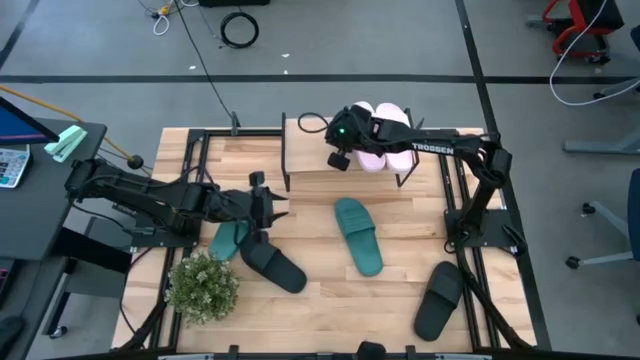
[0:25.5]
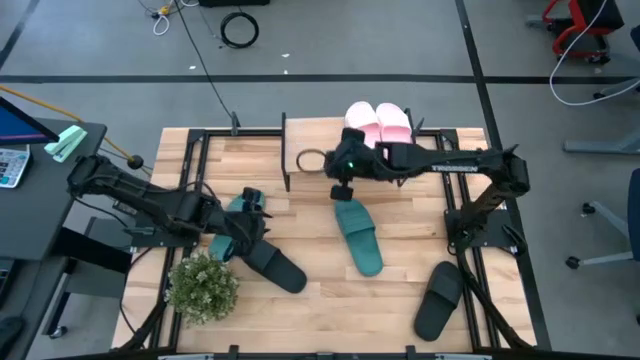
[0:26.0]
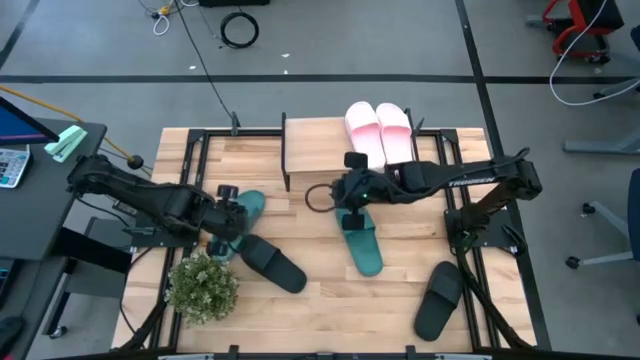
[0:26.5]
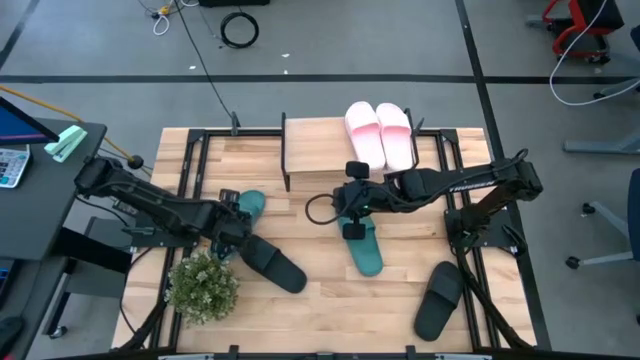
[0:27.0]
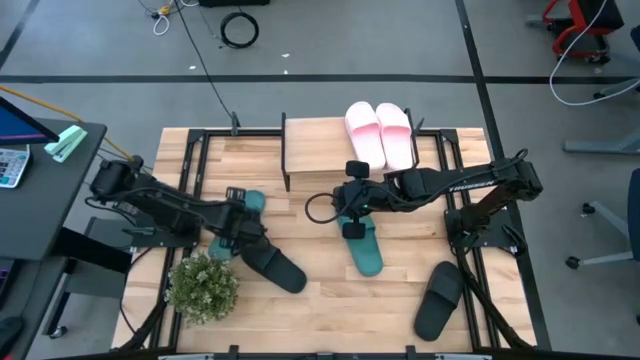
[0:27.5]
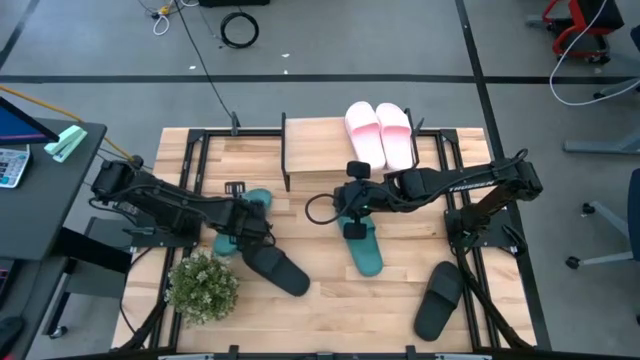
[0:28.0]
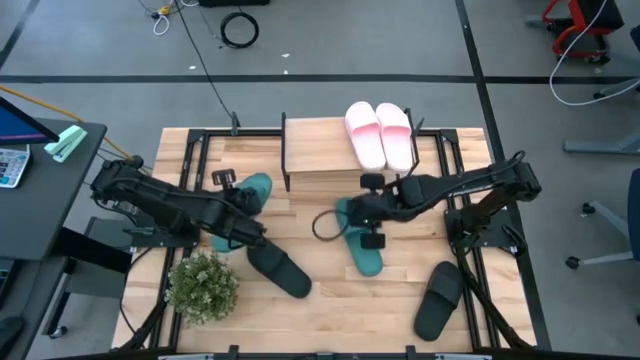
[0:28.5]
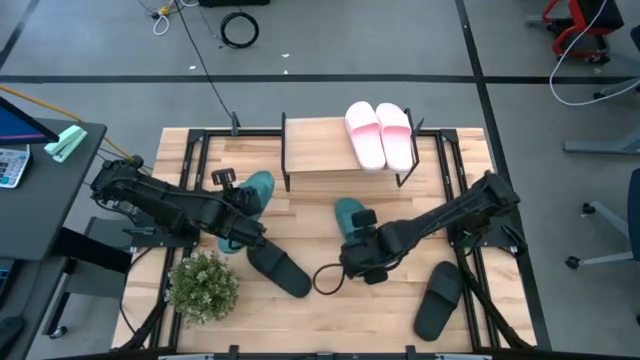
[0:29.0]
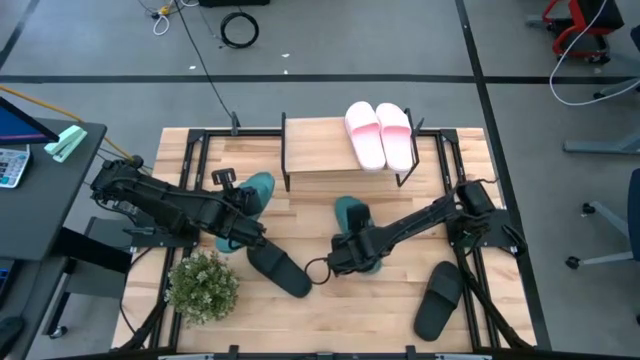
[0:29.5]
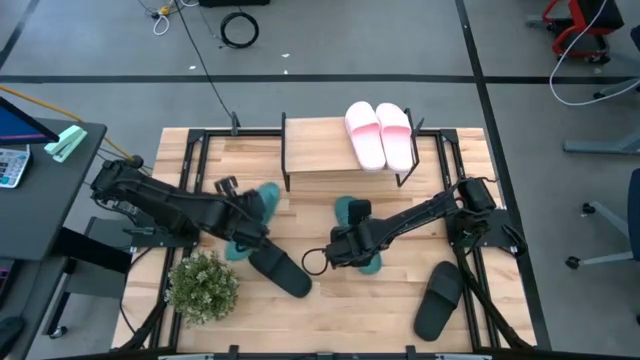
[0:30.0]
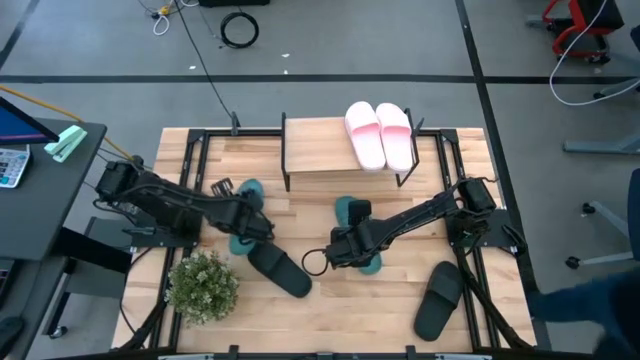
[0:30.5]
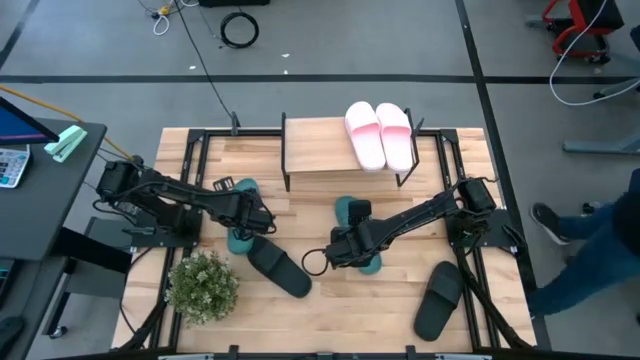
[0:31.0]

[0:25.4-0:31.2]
Task: Pick and place slides into the shelf
Put the left green slipper on the shelf

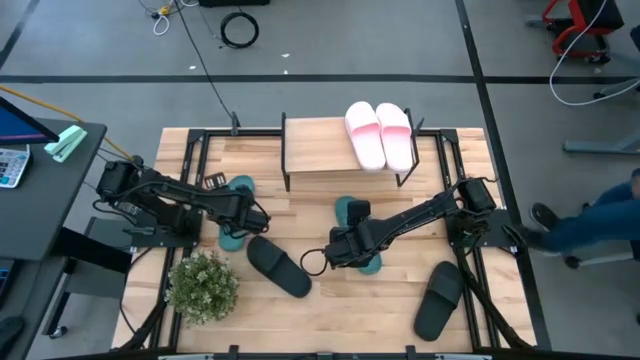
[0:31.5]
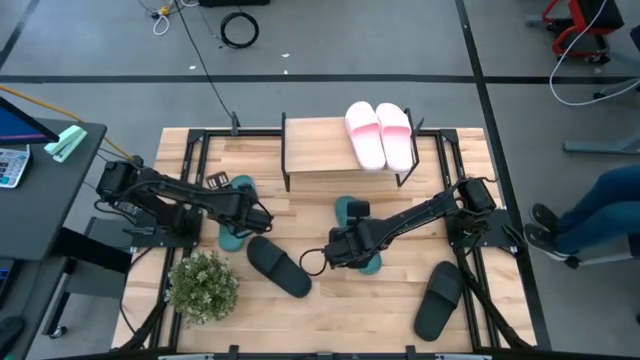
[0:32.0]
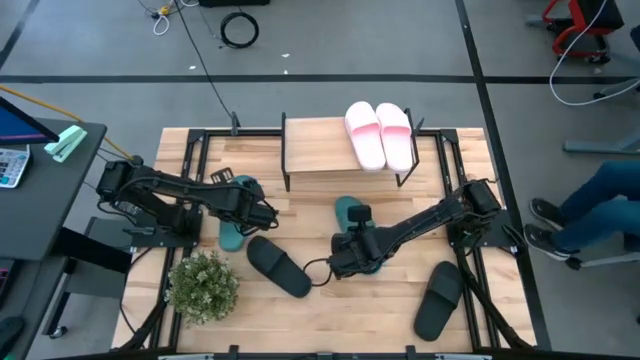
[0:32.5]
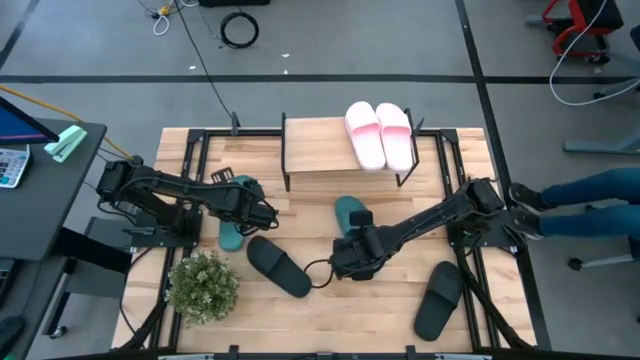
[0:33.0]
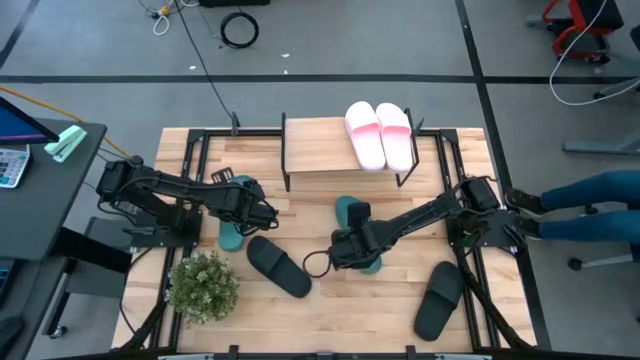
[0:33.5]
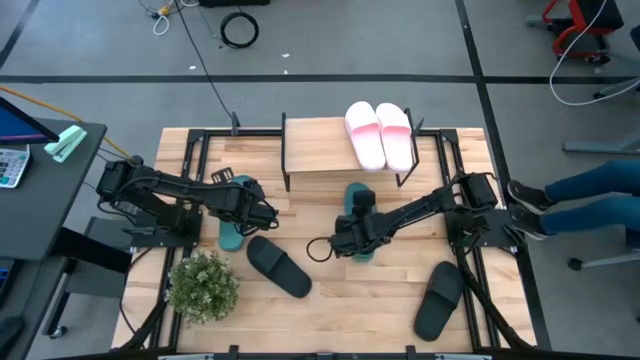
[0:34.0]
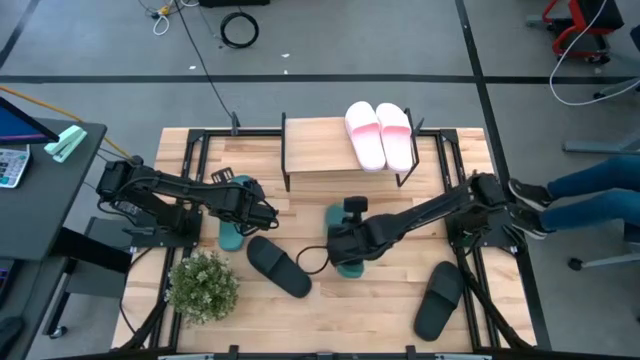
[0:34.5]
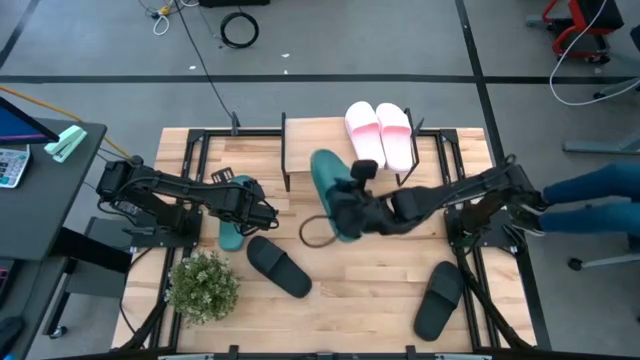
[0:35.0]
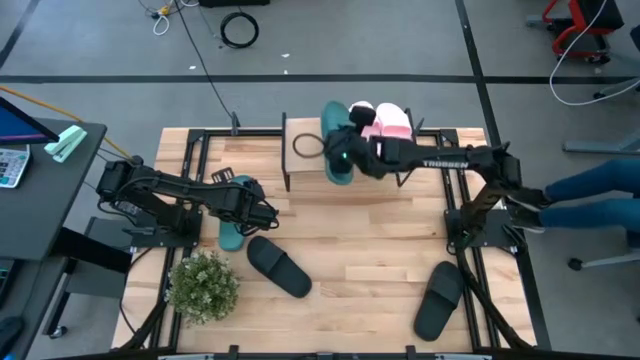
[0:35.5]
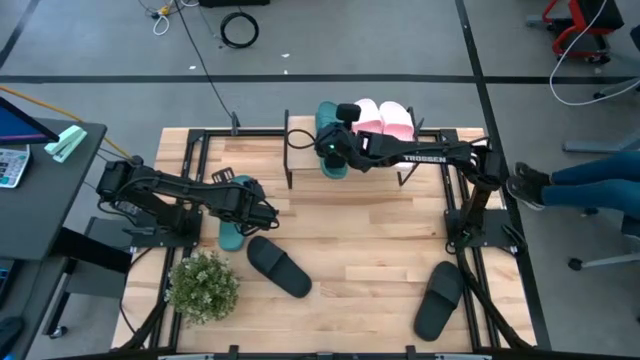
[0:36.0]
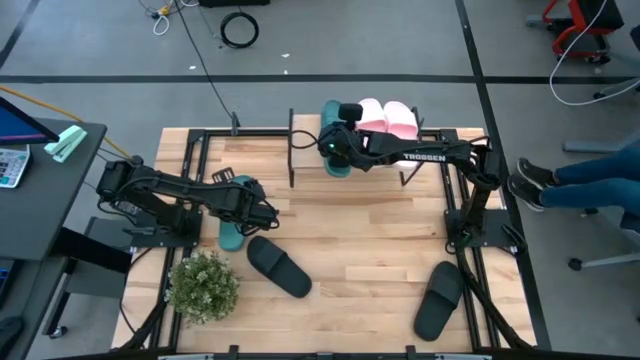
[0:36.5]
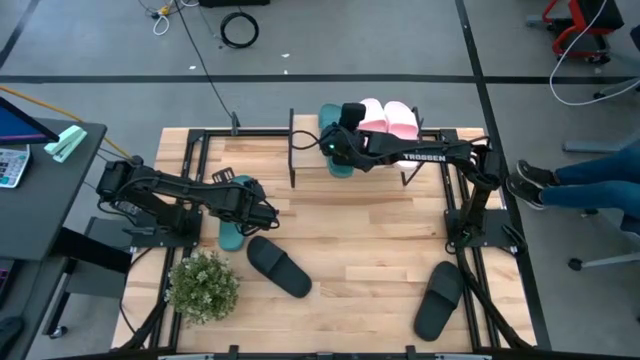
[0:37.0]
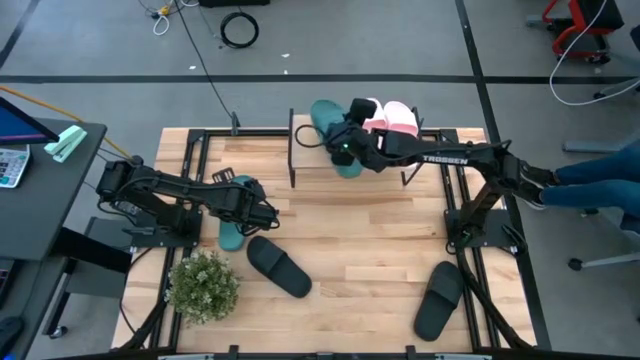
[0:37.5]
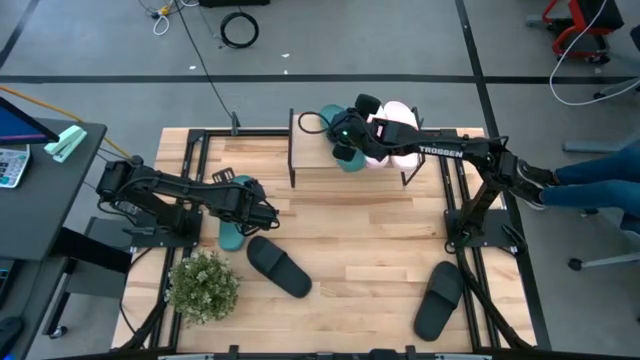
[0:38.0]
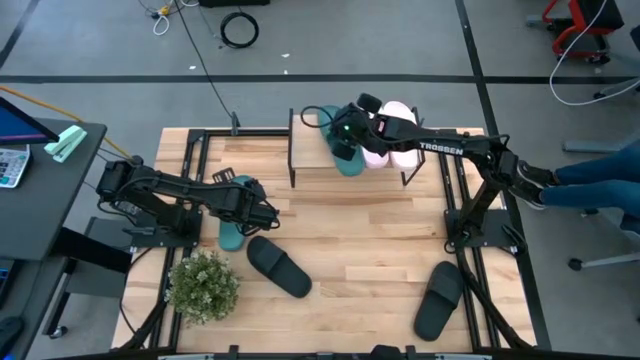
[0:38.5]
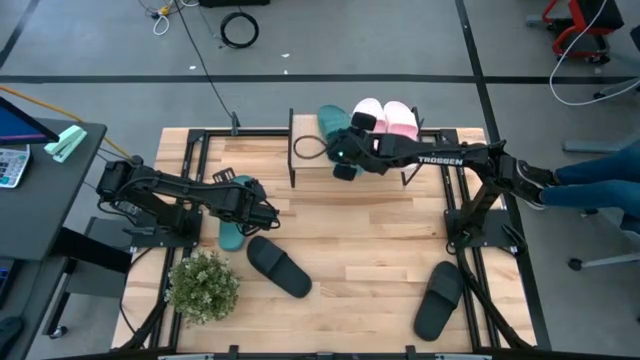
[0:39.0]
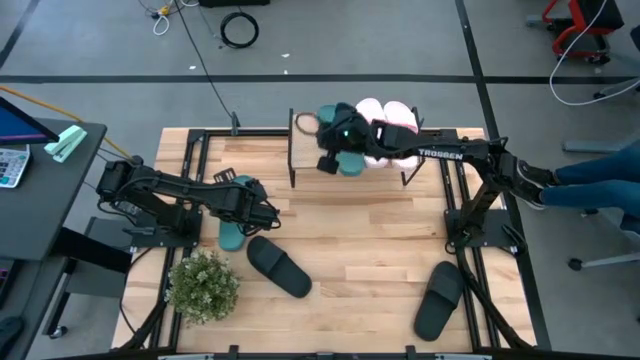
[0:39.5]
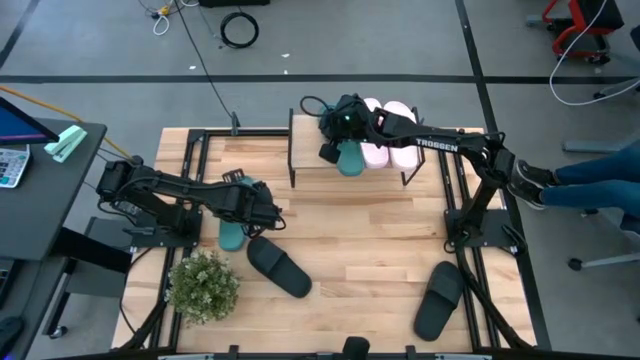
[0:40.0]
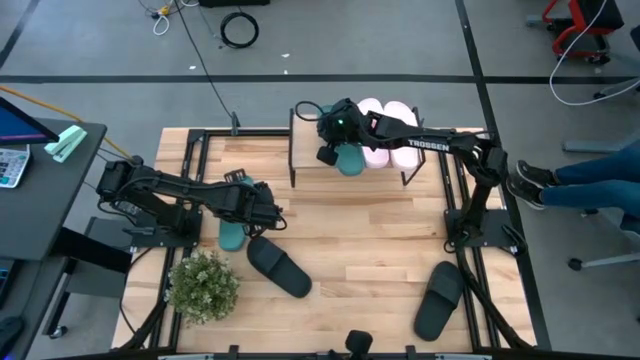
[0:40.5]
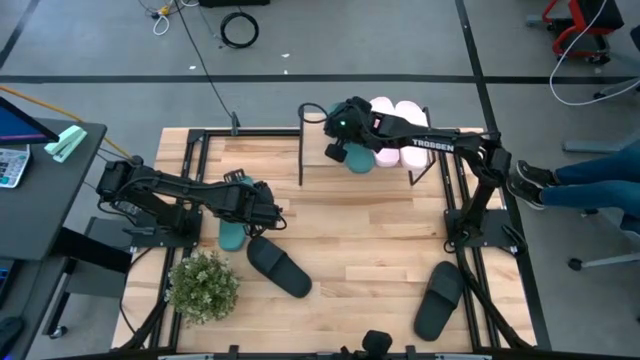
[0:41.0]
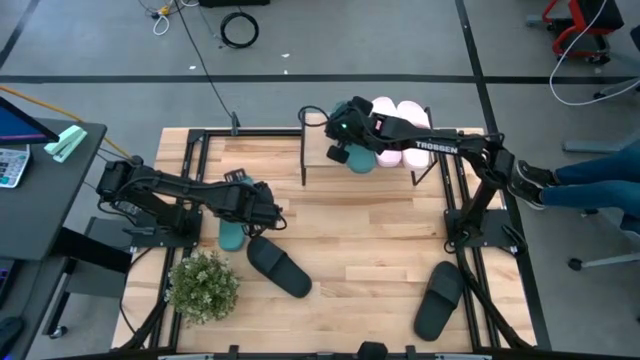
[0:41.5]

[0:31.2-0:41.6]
Put the right green slipper on the shelf

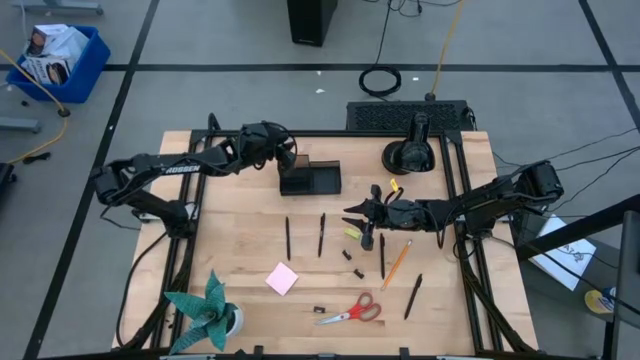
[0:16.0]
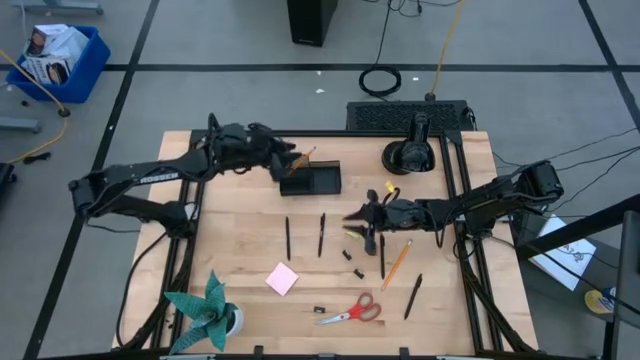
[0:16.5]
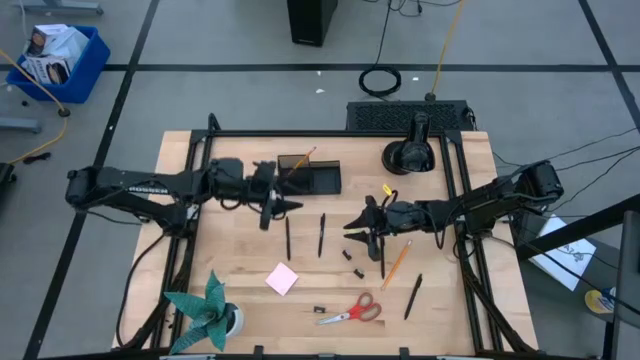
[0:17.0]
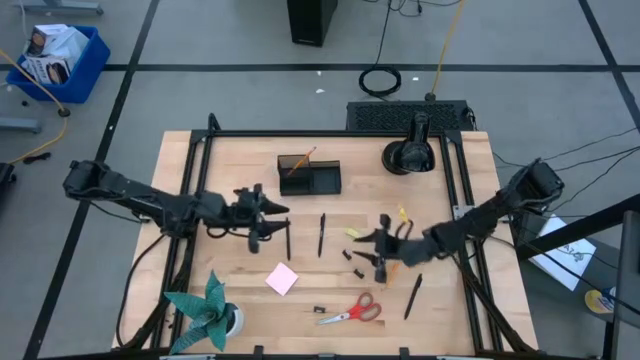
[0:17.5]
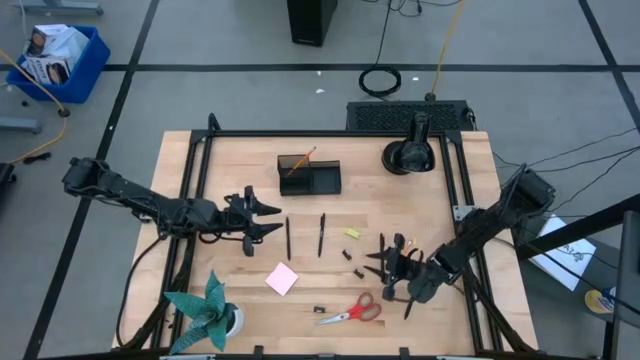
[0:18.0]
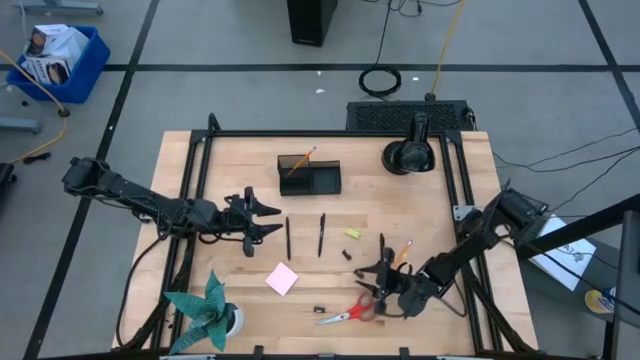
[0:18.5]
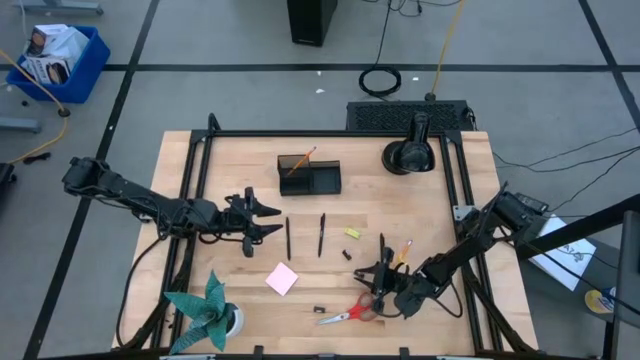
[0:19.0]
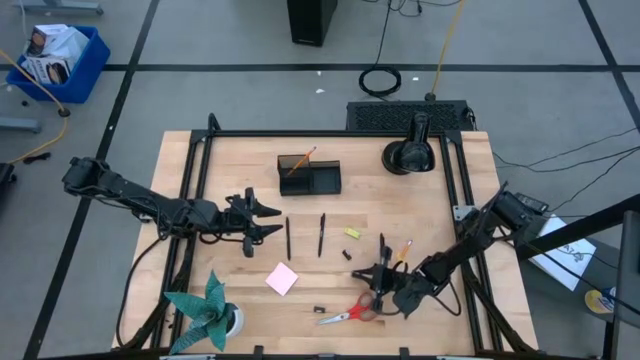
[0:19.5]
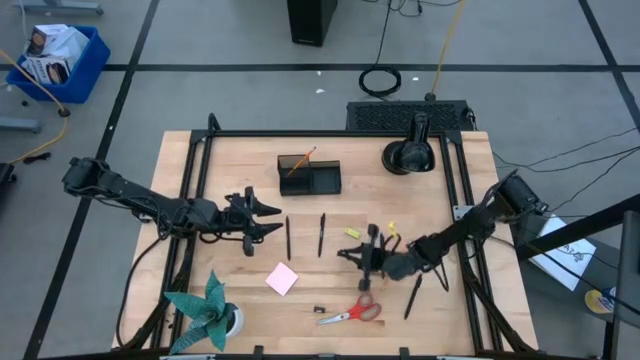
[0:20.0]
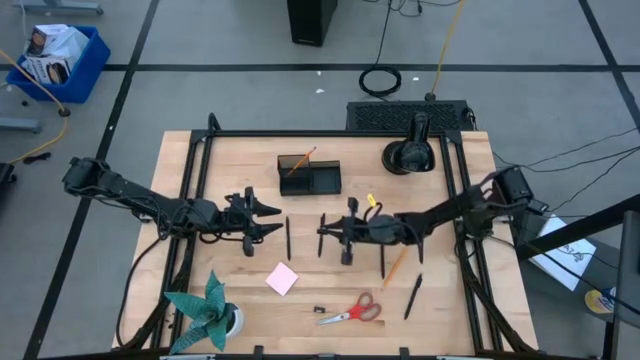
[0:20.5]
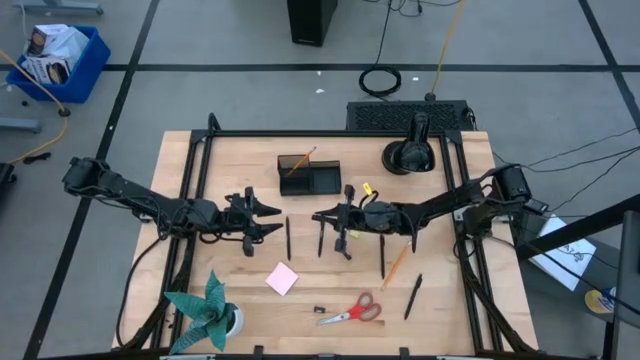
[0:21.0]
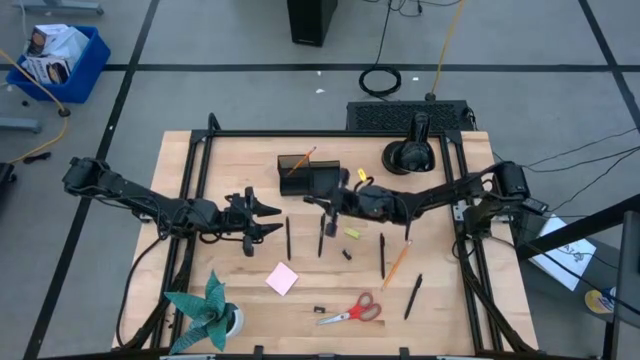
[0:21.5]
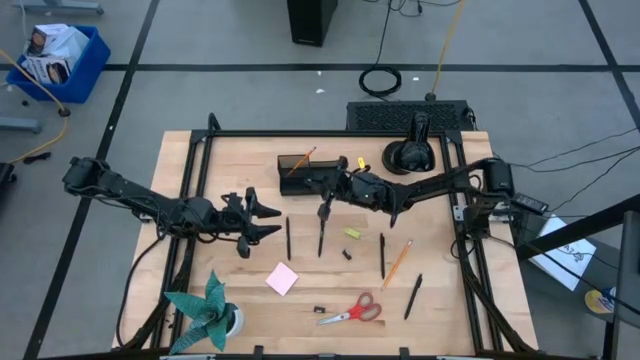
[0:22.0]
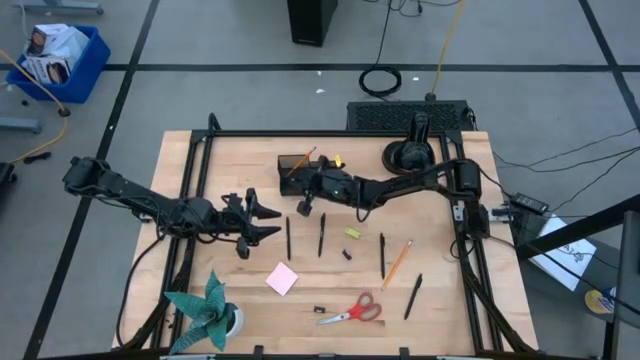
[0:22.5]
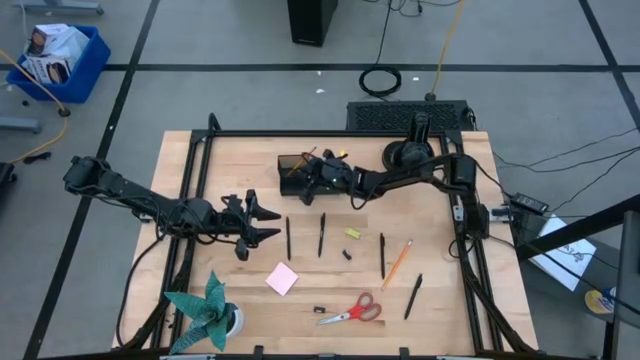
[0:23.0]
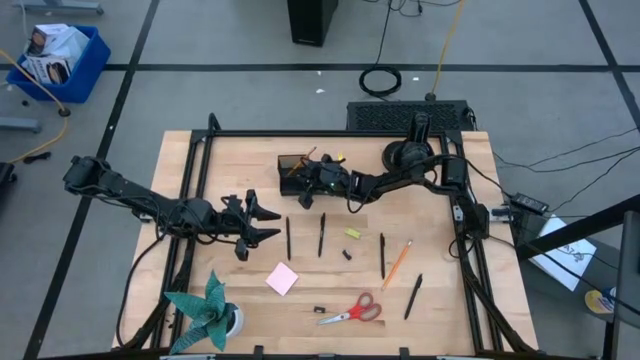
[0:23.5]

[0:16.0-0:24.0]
Task: Pick and place office supplies into organizer
Put the black binder clip into the black desk organizer
